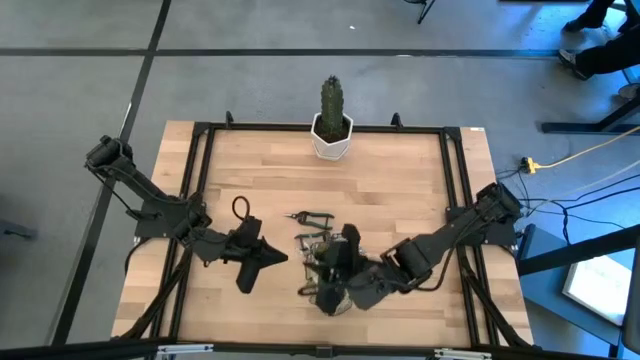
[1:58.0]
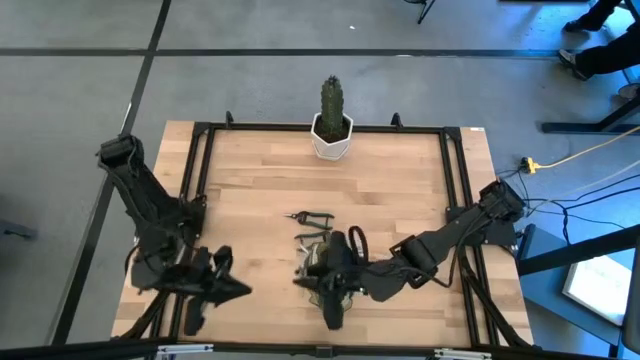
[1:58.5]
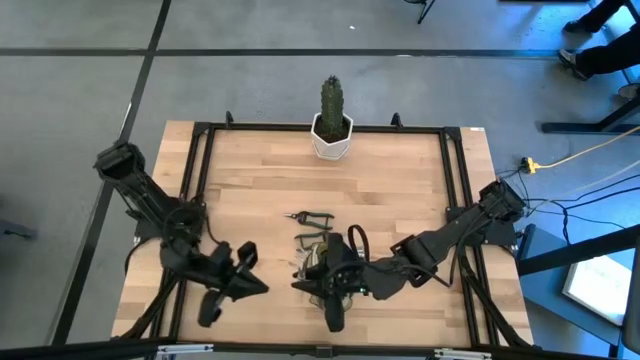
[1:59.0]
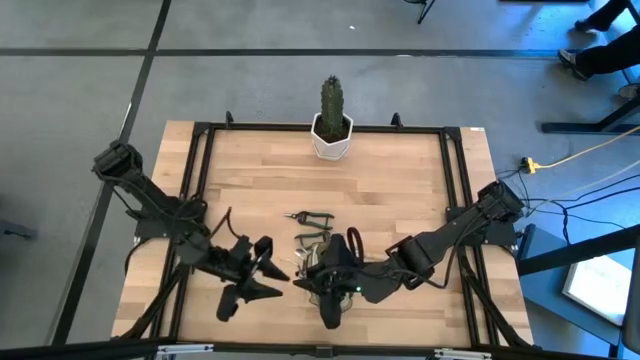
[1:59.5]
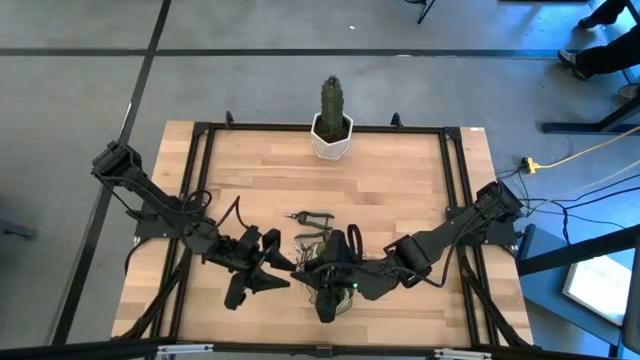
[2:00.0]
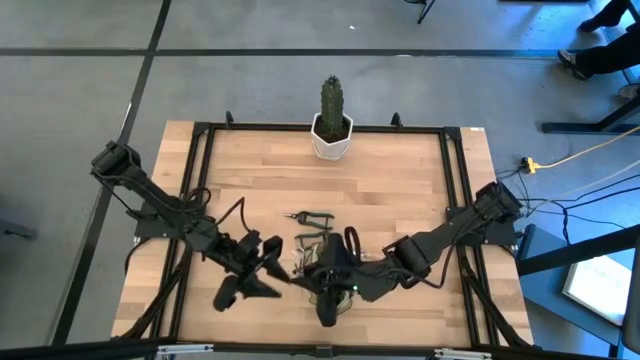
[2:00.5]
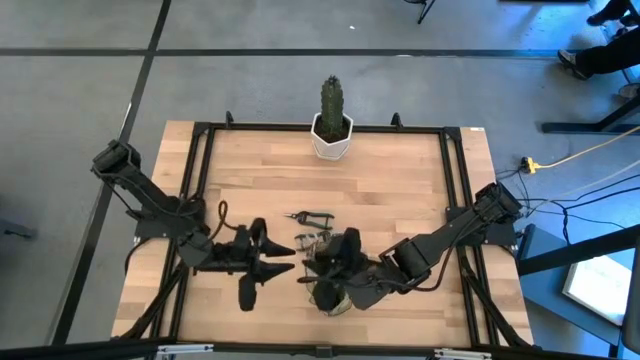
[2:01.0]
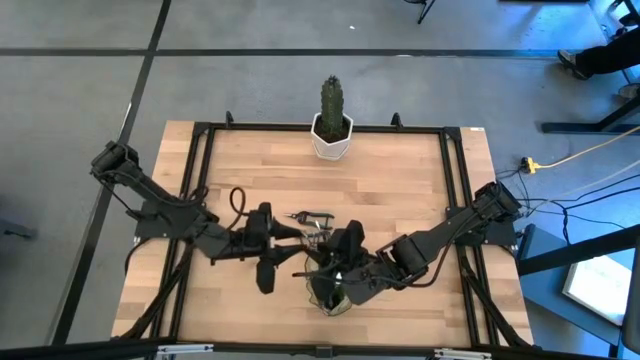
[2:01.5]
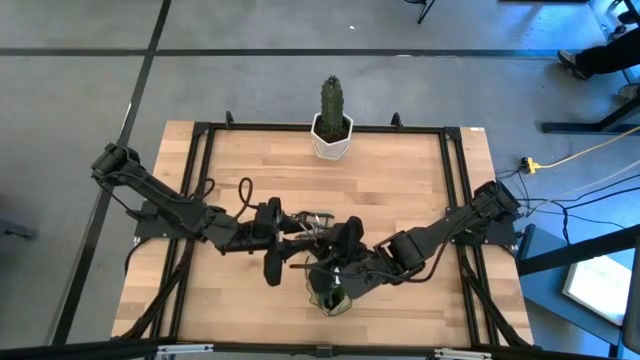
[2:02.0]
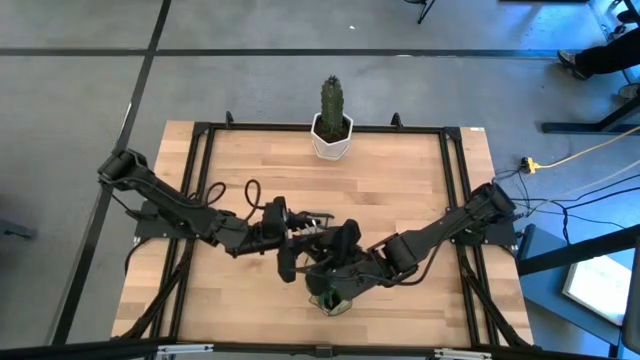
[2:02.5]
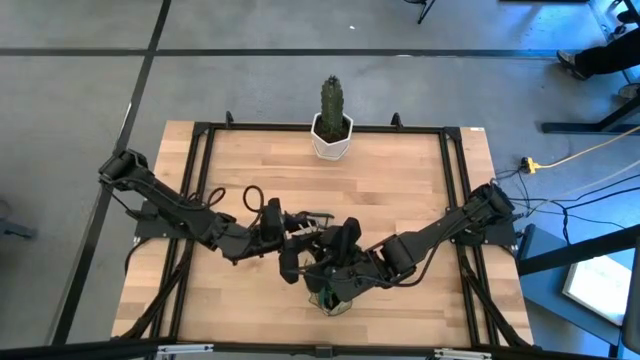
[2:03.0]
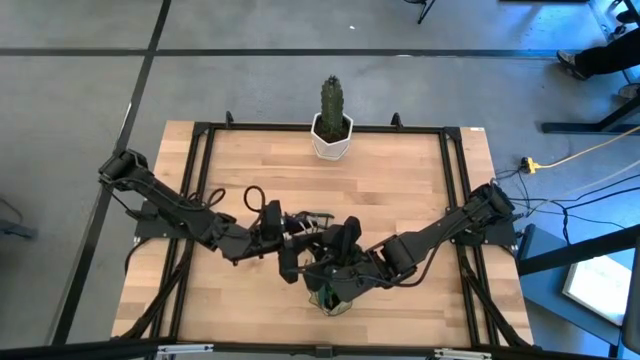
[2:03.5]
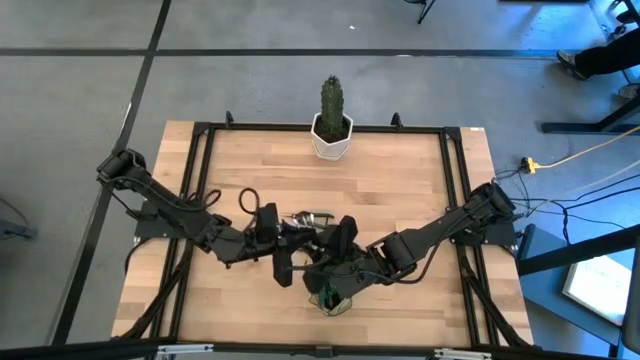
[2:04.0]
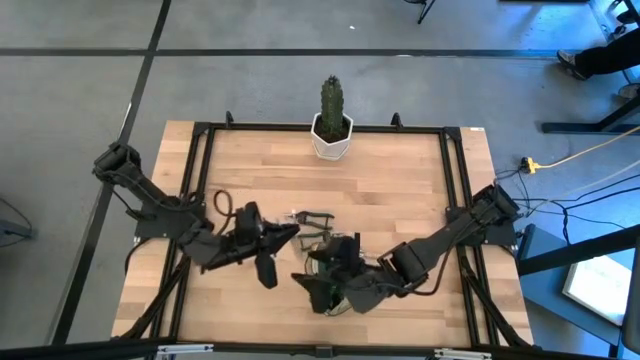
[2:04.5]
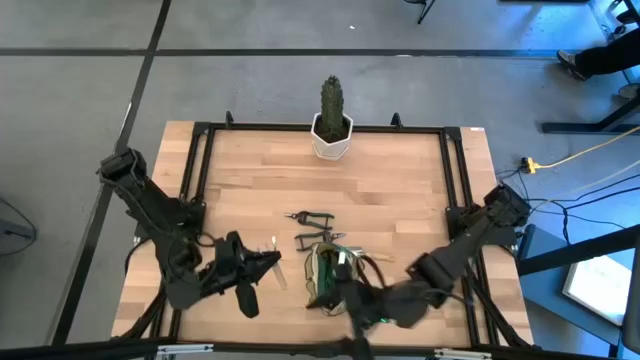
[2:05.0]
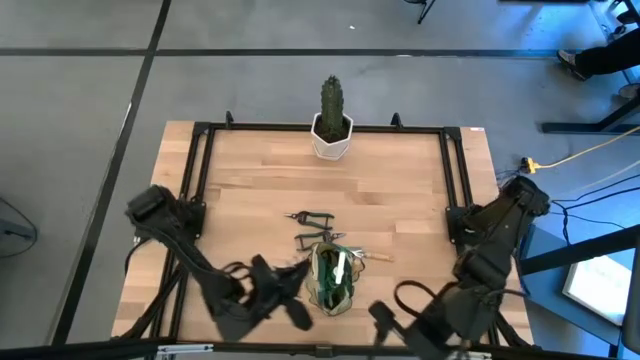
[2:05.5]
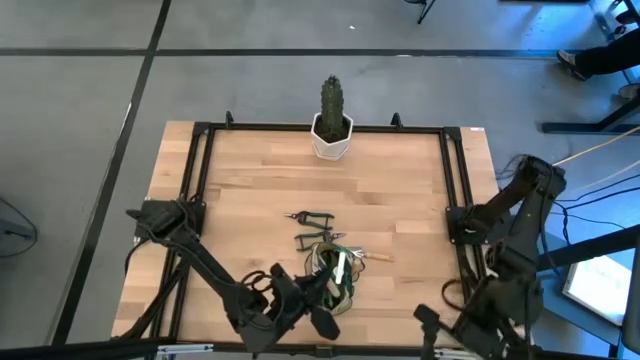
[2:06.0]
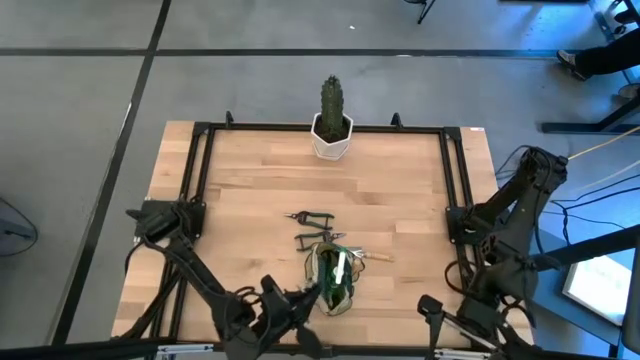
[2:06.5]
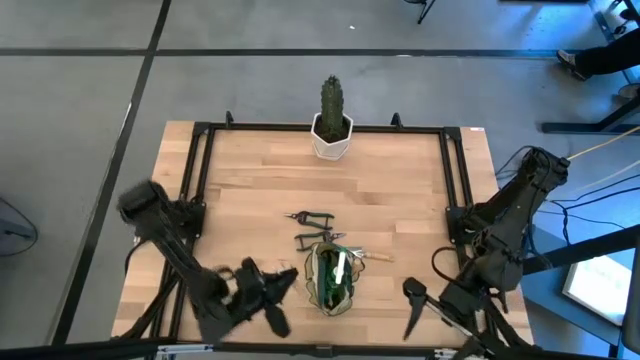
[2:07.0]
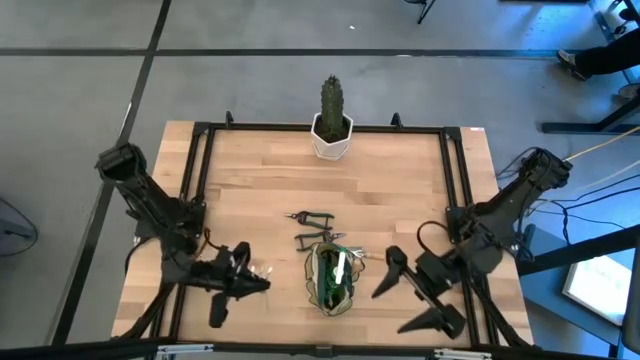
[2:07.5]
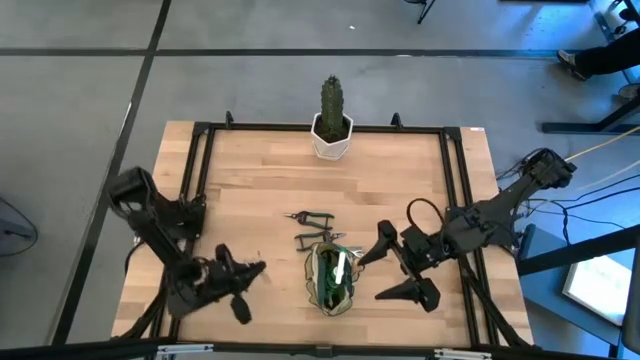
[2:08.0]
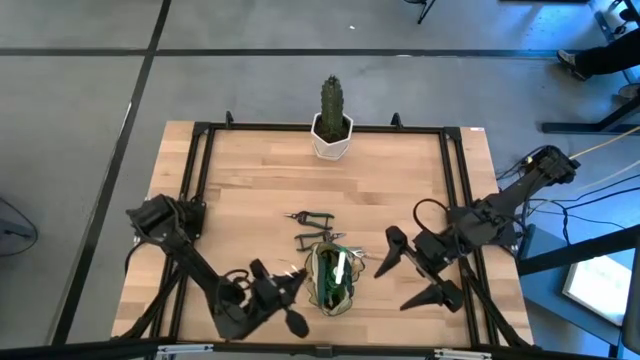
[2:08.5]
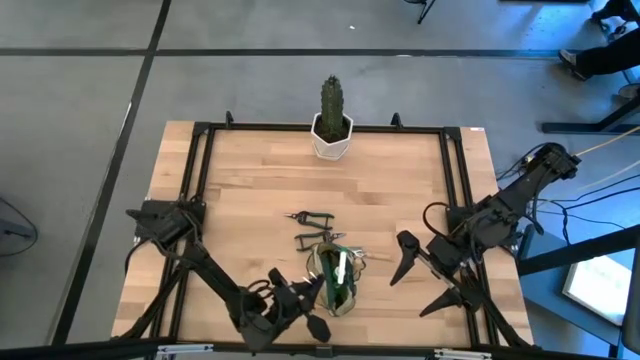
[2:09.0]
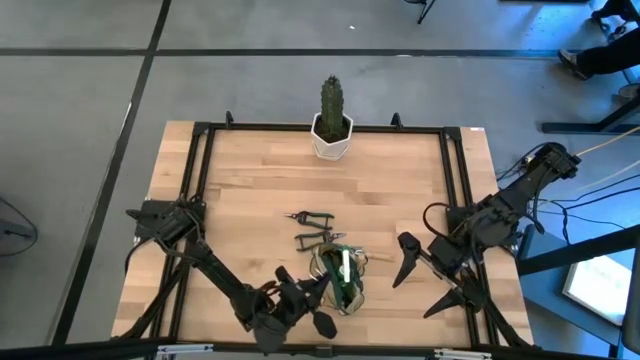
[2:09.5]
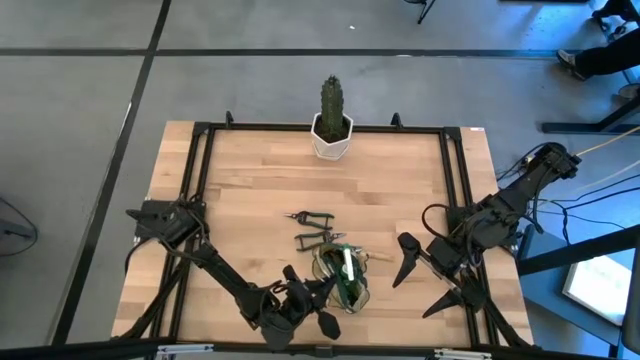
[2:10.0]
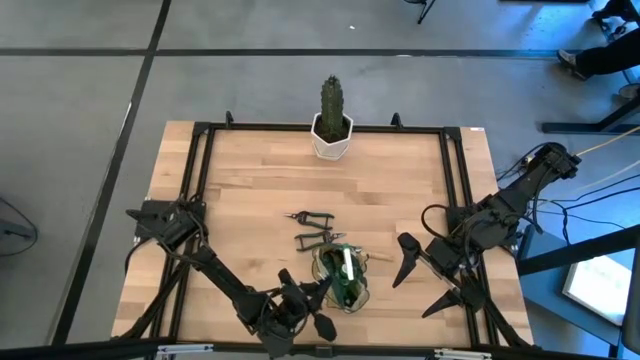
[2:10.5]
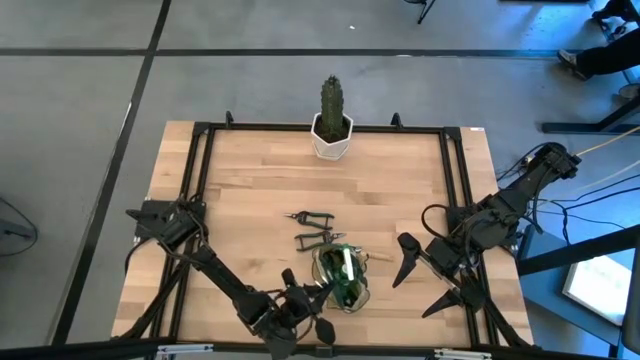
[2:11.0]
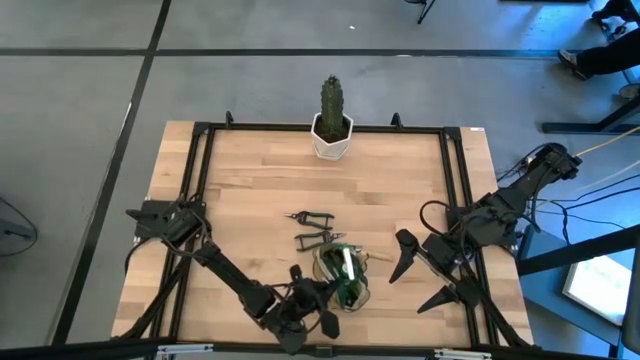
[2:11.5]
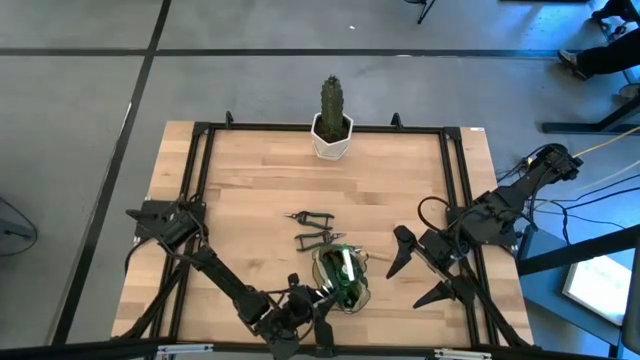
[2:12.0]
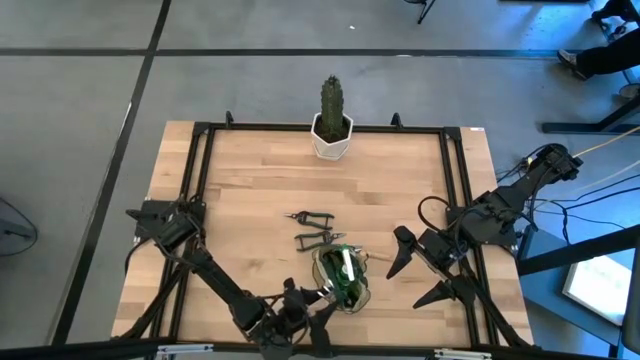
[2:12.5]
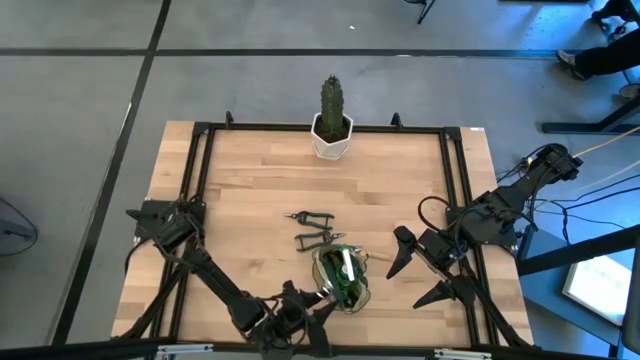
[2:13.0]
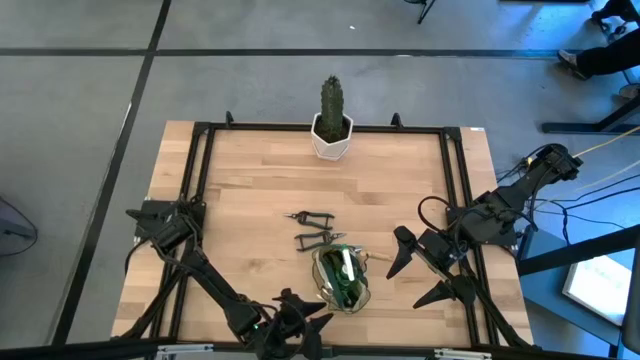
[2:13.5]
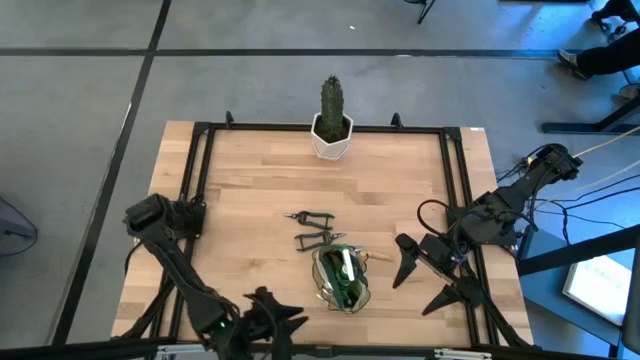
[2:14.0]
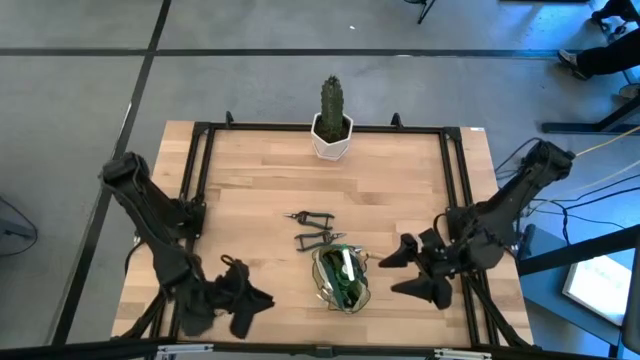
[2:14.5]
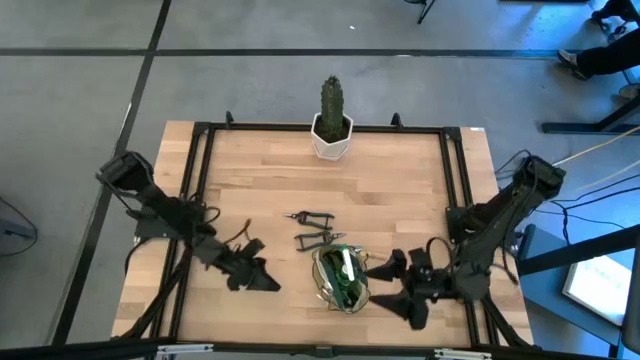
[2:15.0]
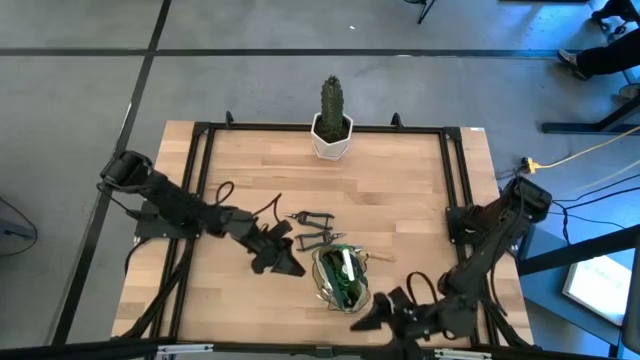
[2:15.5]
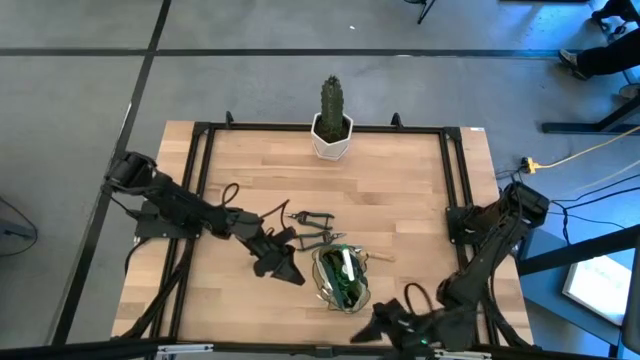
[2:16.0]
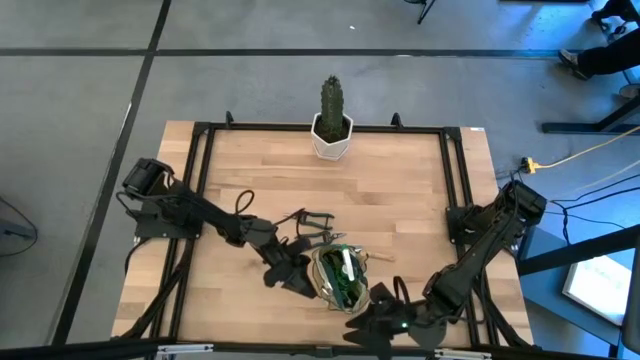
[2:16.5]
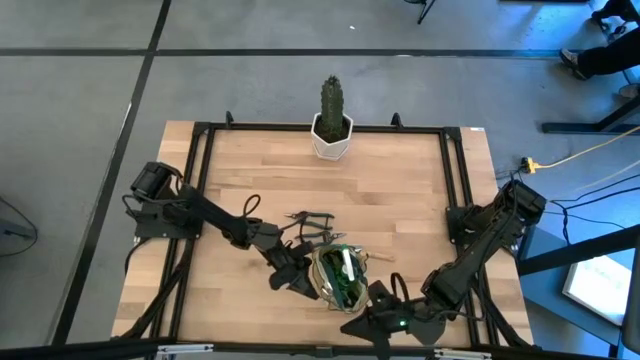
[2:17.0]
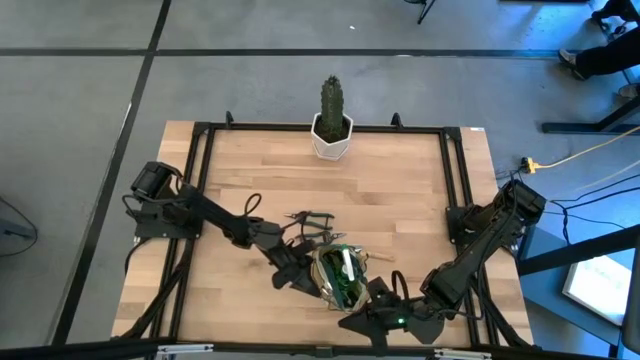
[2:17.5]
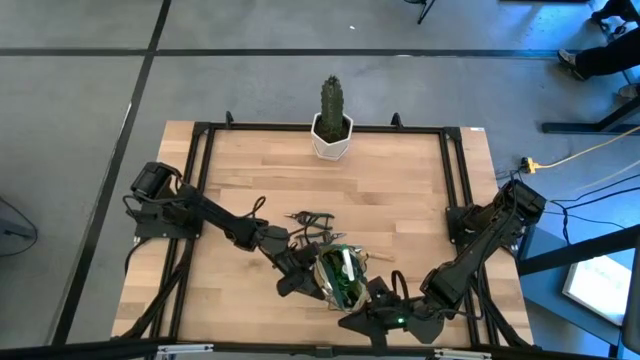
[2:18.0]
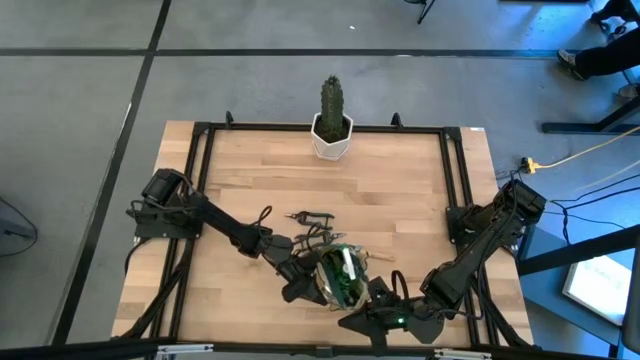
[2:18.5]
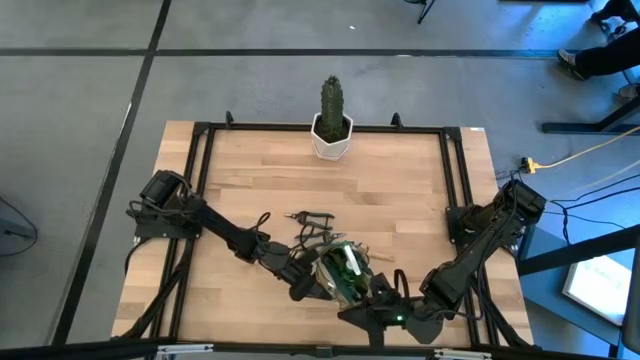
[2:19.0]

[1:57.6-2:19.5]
Task: Pick & Place Garden tools in Gardening bag
Put the hand rake into the gardening bag
